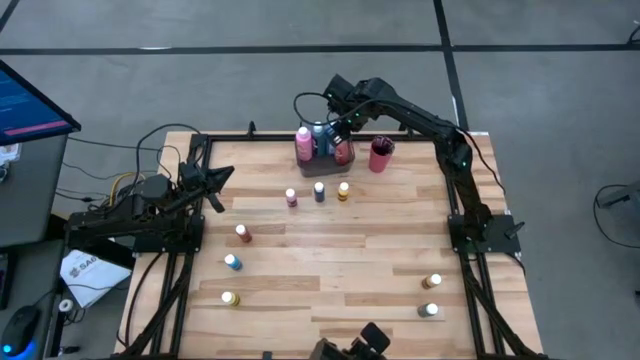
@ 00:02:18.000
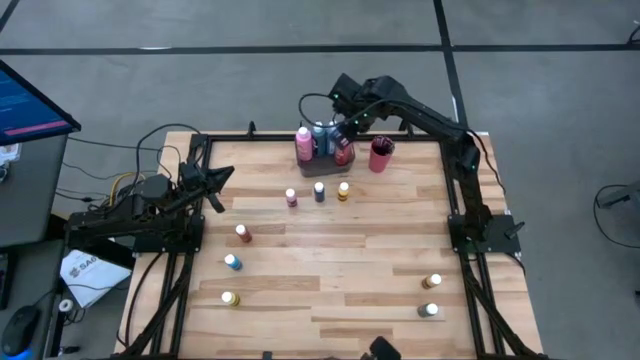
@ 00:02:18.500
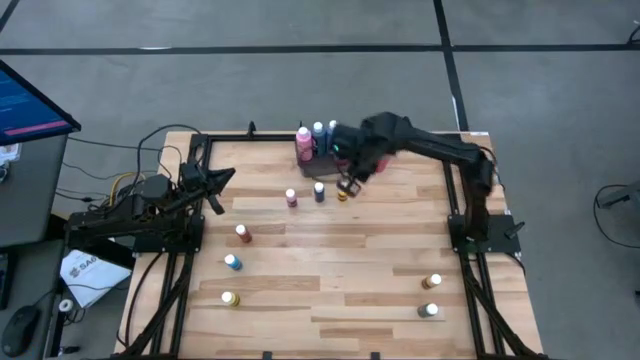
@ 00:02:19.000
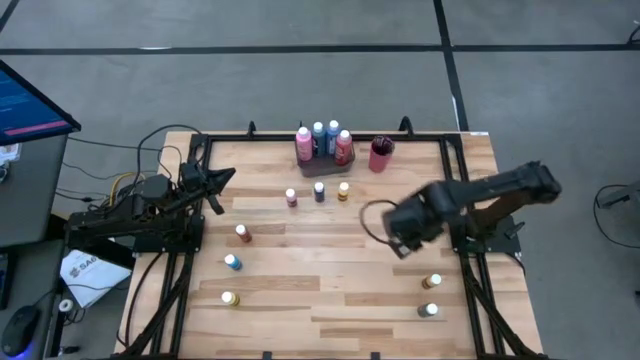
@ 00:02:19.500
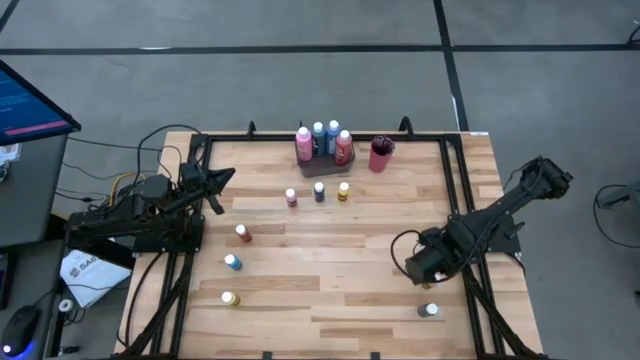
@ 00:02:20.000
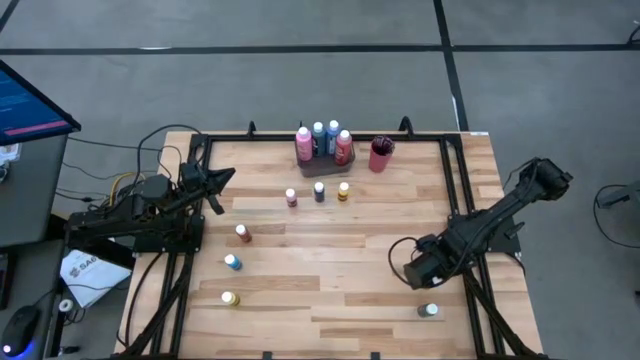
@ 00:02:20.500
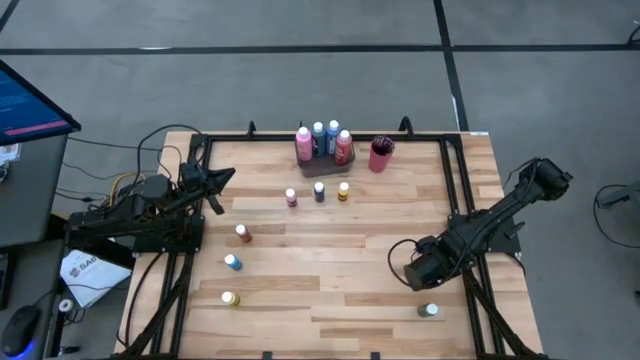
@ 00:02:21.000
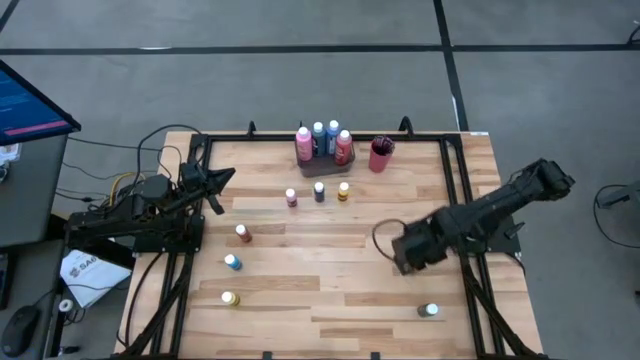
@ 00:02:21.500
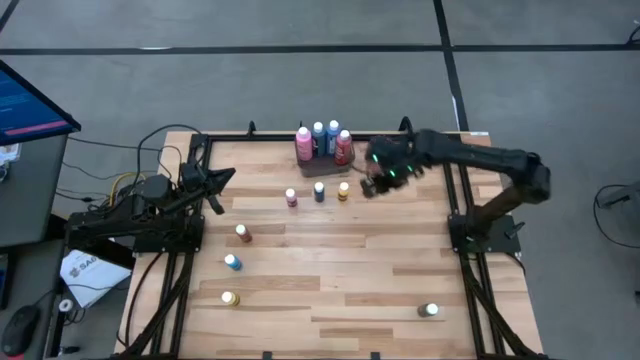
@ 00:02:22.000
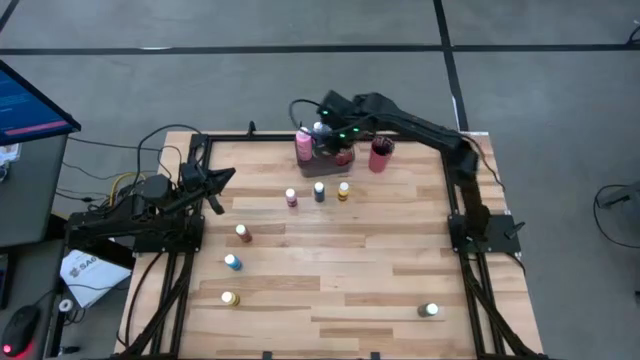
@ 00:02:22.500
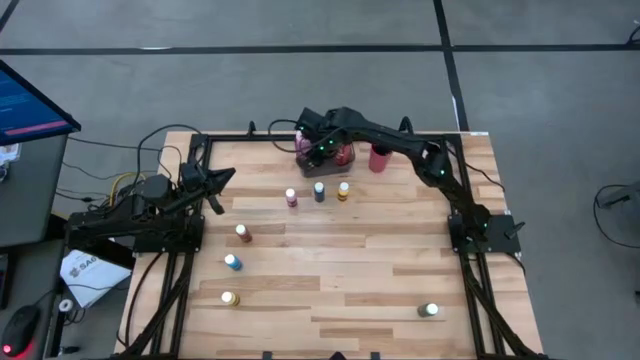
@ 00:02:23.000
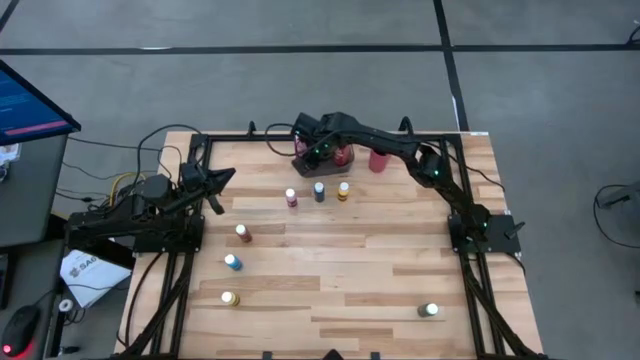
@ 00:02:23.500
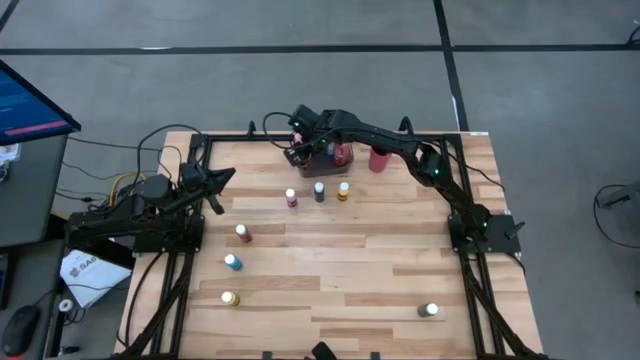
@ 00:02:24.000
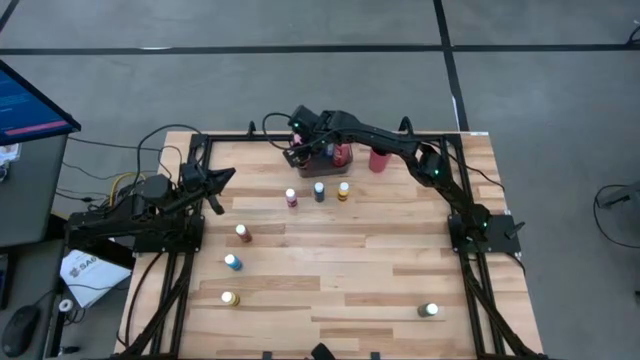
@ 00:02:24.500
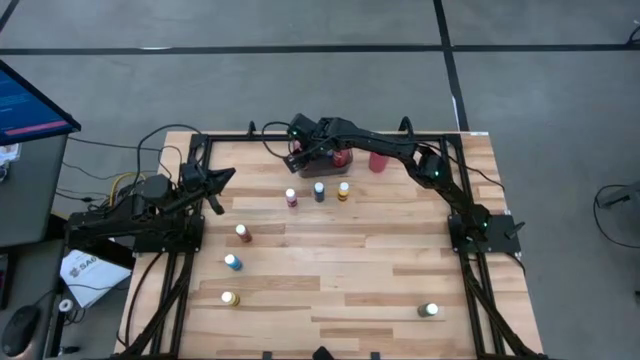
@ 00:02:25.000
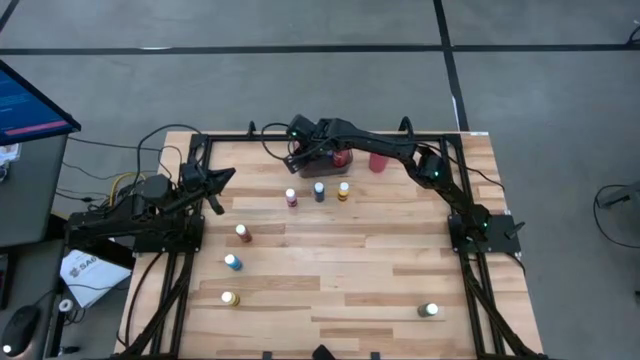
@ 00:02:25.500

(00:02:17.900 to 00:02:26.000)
Task: Pick & Place Paint Supplies
Put the orange paint bottle into the gray bin

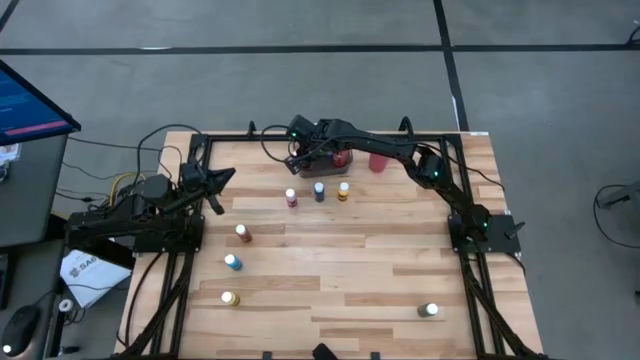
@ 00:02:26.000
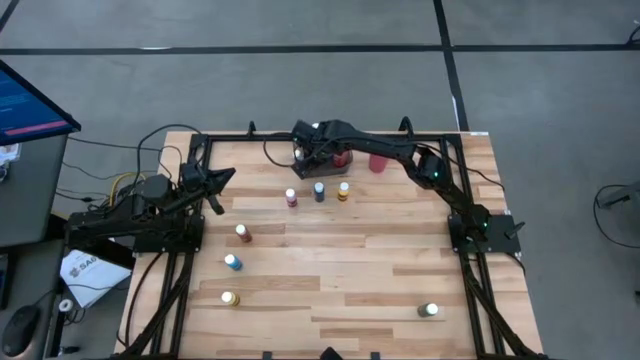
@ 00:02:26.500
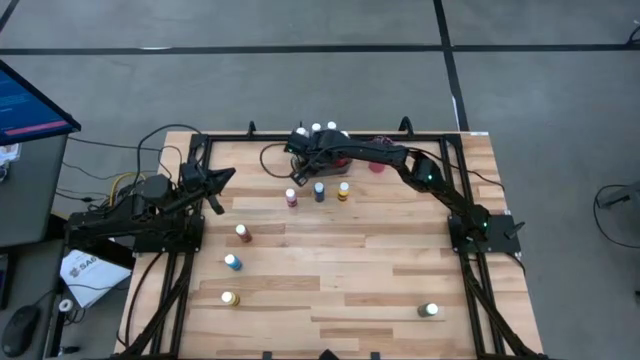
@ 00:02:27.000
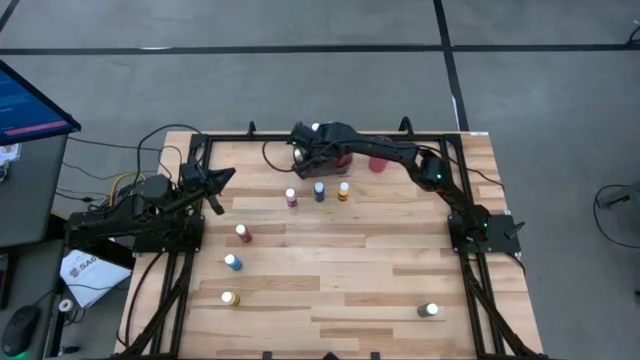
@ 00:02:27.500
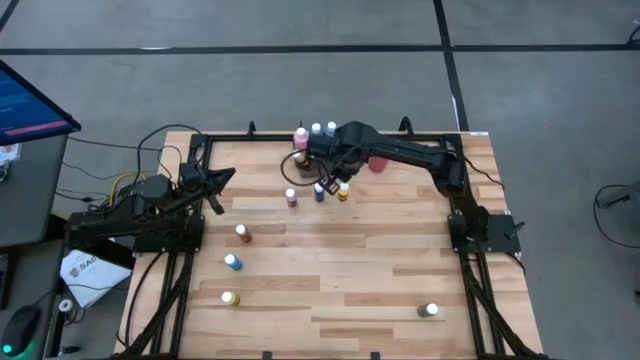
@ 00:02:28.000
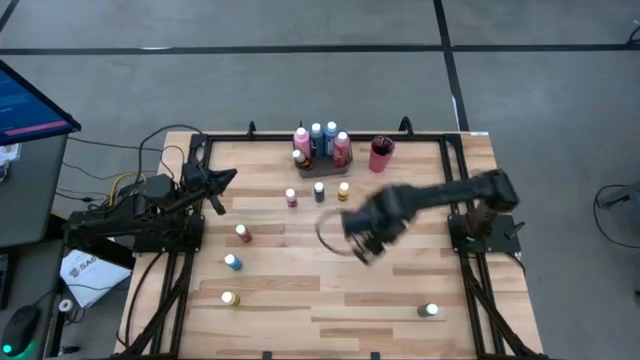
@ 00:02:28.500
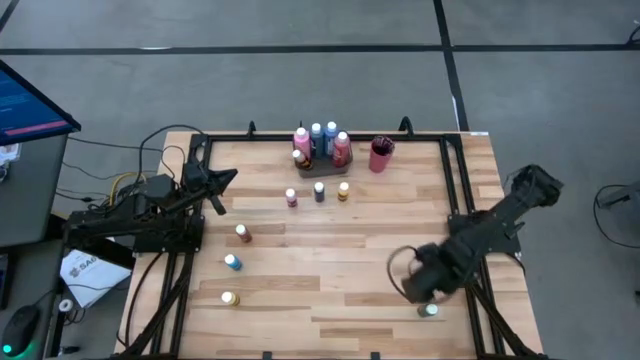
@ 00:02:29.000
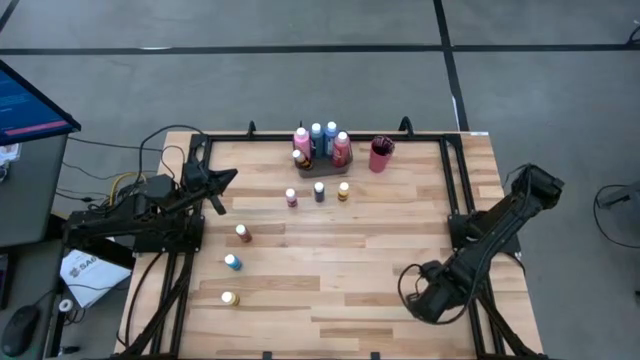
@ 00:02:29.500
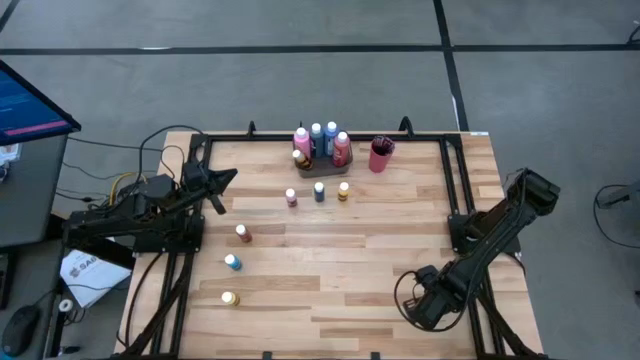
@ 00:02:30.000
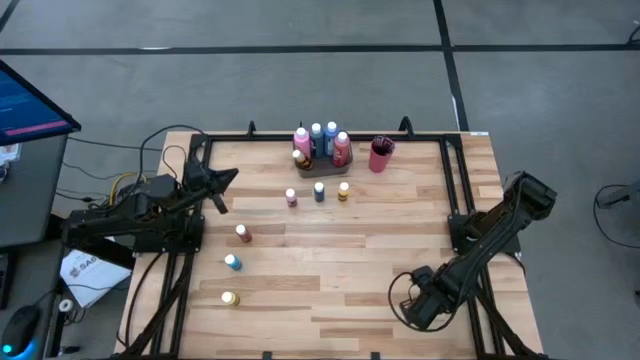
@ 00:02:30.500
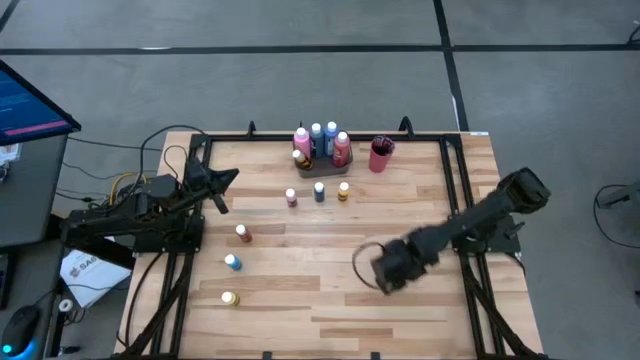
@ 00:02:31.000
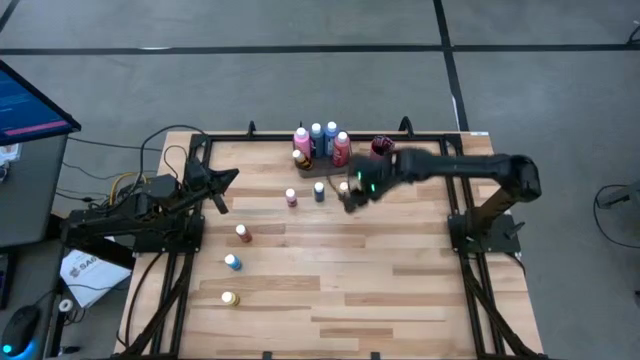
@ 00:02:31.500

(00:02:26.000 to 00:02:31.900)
Put the dark green paint bottle into the gray bin

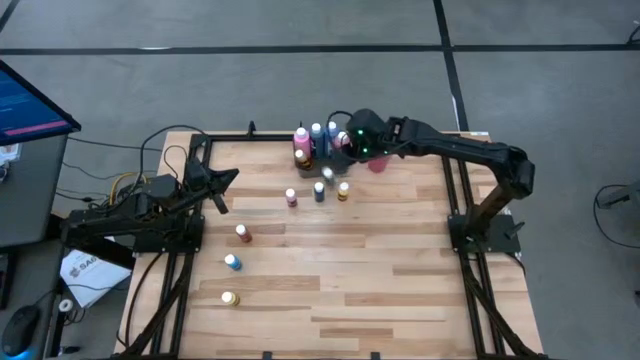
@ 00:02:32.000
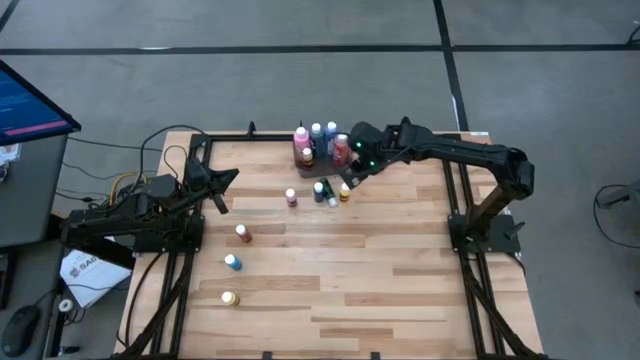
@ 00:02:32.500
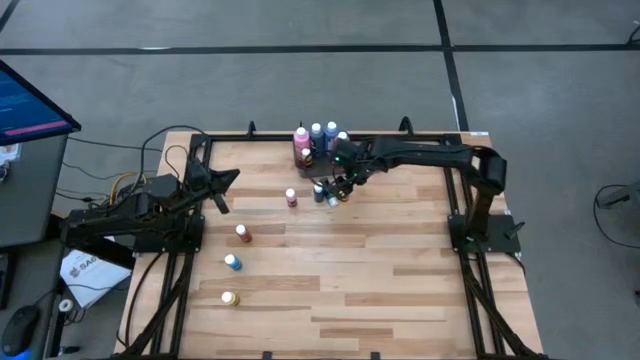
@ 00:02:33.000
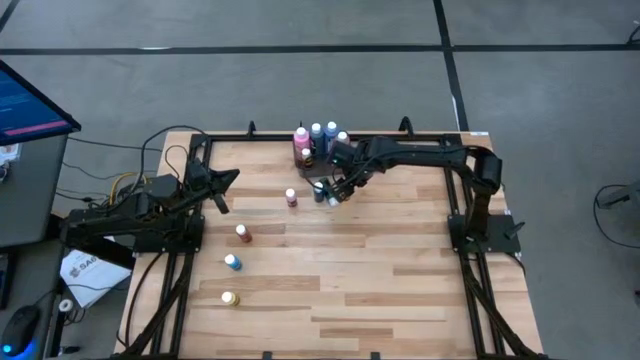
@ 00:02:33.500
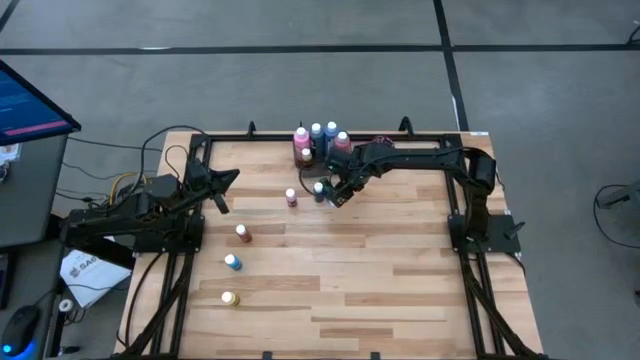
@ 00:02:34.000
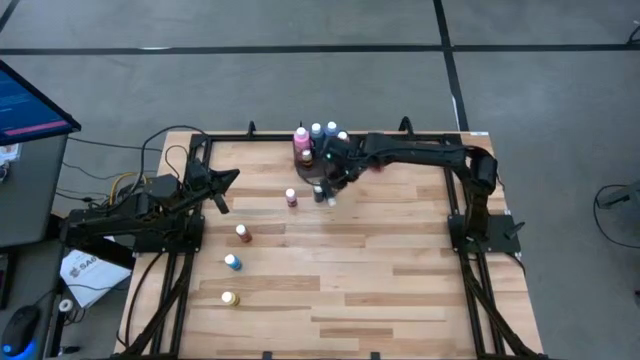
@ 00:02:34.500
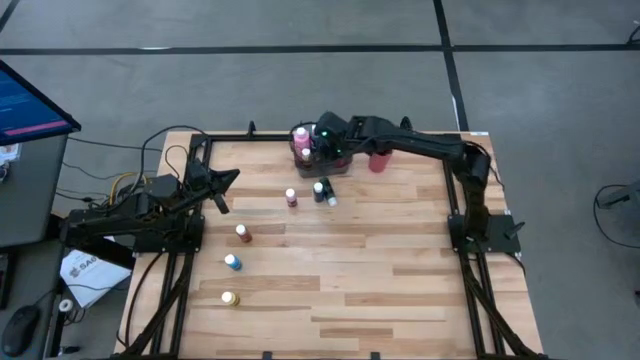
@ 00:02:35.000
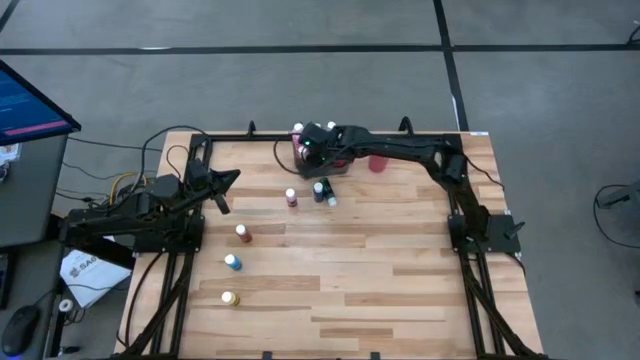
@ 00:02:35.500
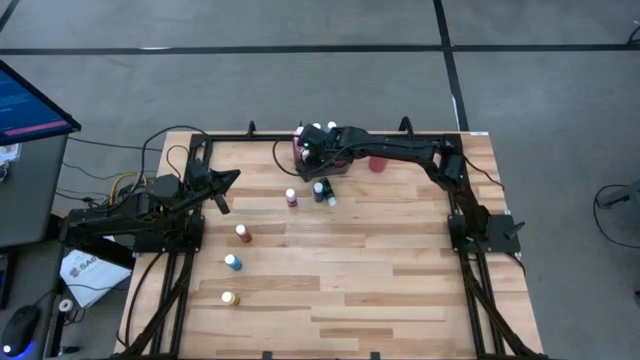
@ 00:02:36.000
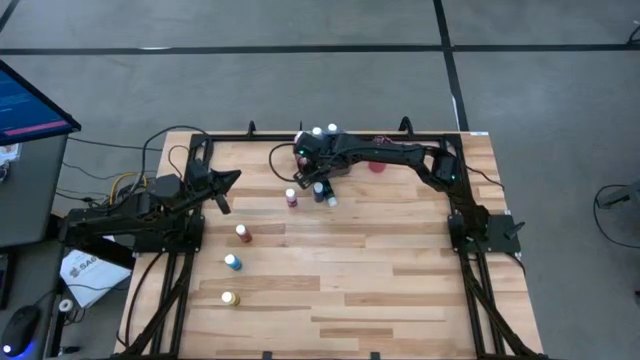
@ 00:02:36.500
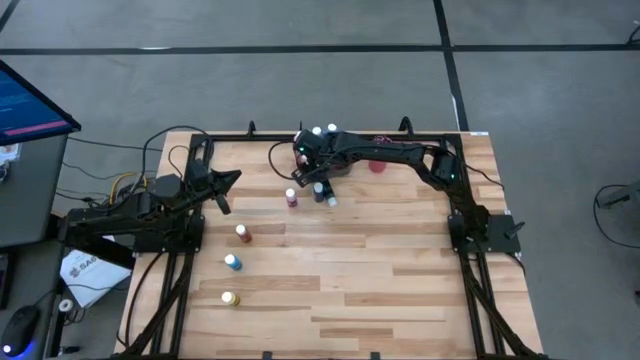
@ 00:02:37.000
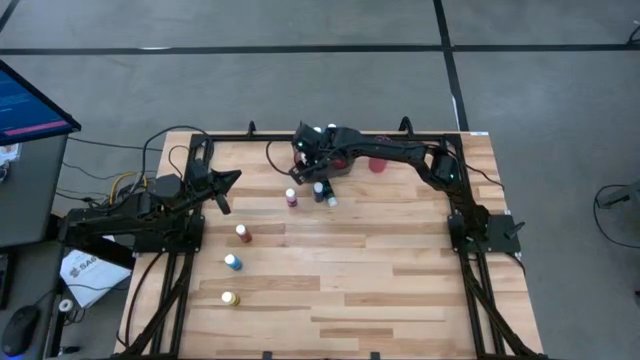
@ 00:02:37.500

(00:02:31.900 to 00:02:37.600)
Put the orange paint bottle into the gray bin
